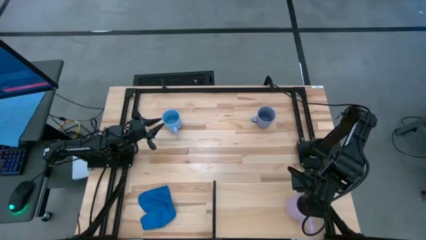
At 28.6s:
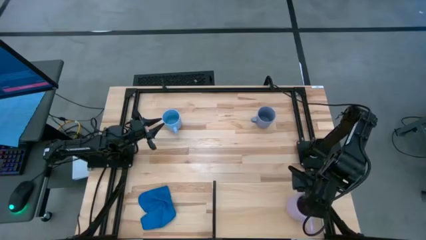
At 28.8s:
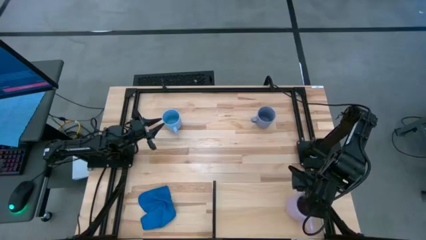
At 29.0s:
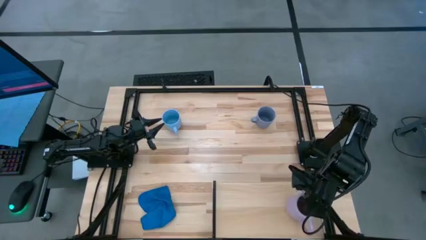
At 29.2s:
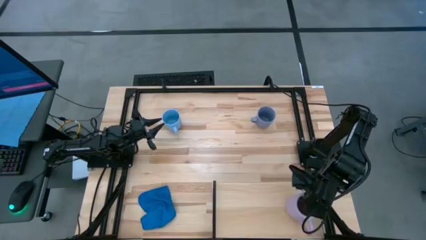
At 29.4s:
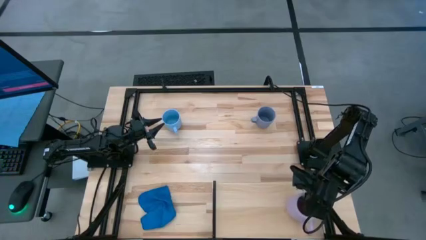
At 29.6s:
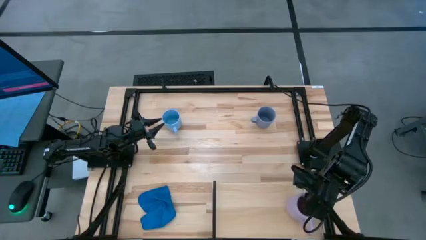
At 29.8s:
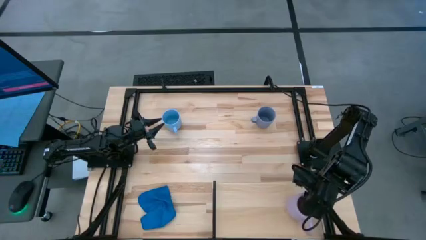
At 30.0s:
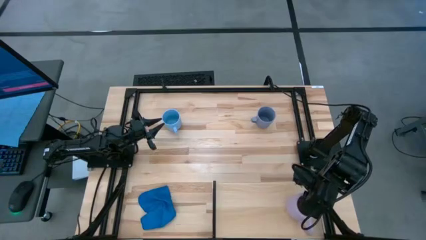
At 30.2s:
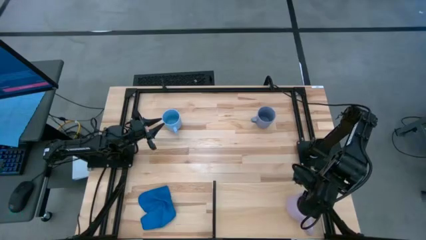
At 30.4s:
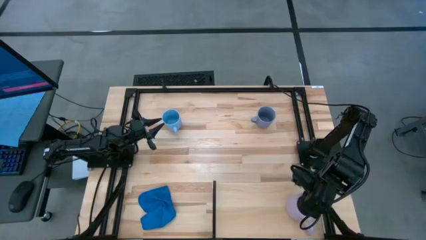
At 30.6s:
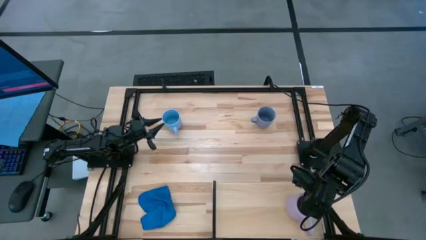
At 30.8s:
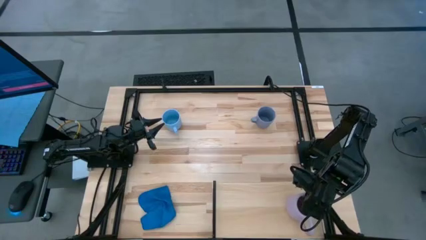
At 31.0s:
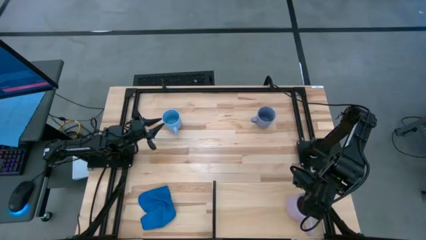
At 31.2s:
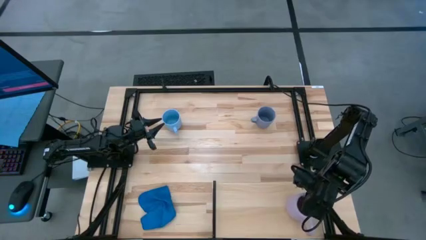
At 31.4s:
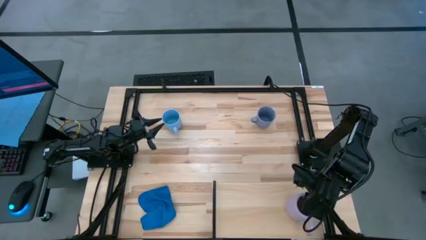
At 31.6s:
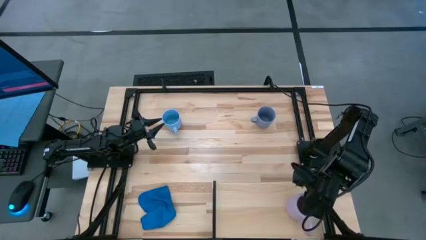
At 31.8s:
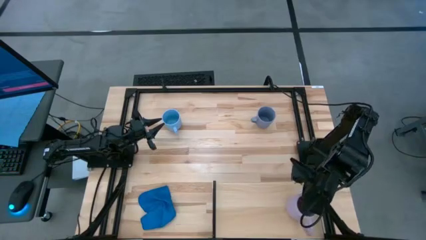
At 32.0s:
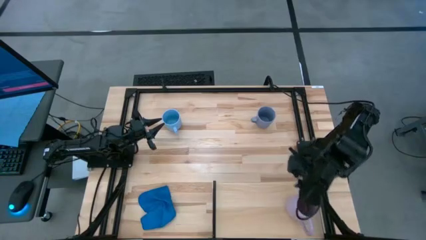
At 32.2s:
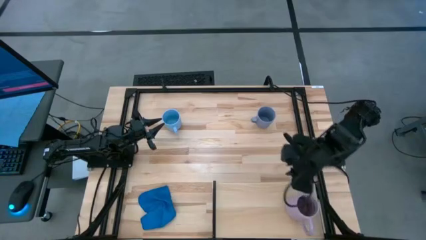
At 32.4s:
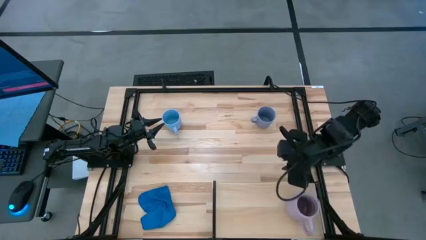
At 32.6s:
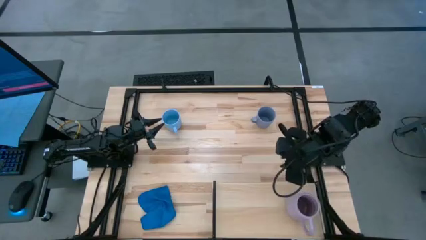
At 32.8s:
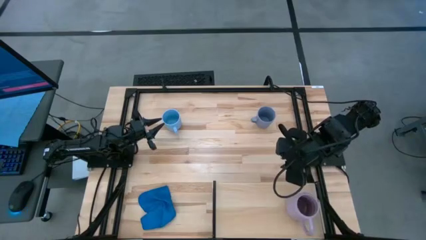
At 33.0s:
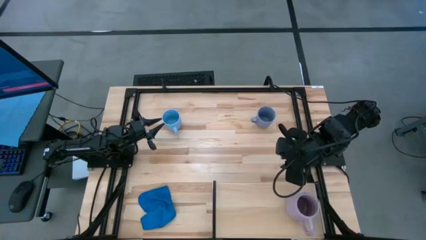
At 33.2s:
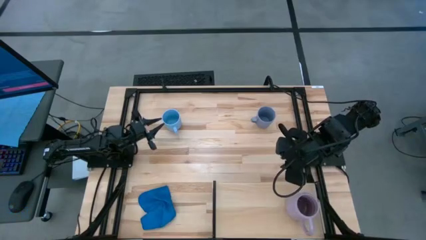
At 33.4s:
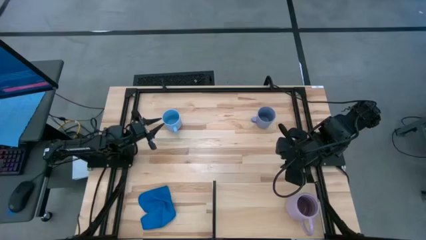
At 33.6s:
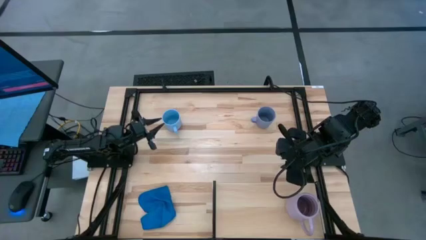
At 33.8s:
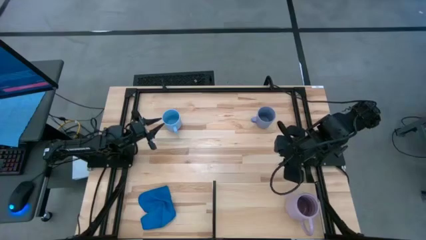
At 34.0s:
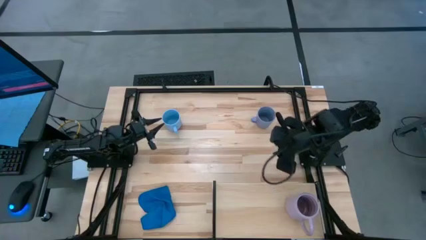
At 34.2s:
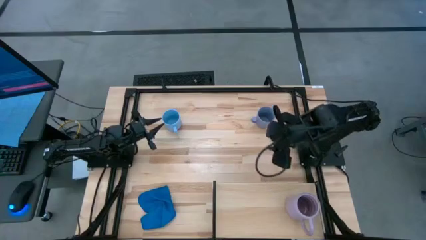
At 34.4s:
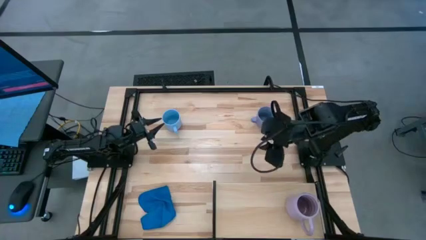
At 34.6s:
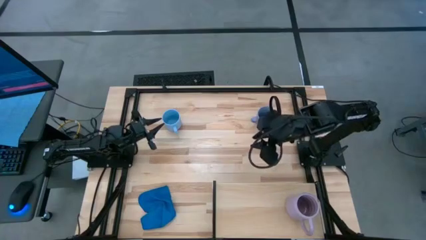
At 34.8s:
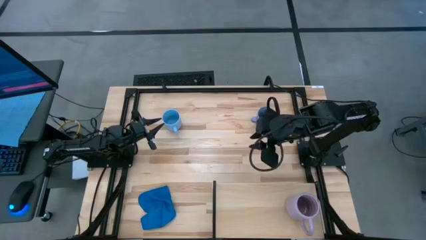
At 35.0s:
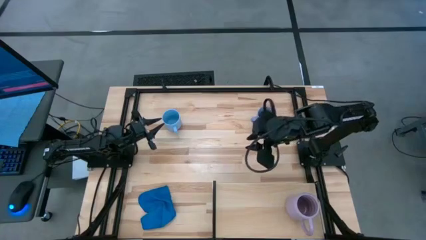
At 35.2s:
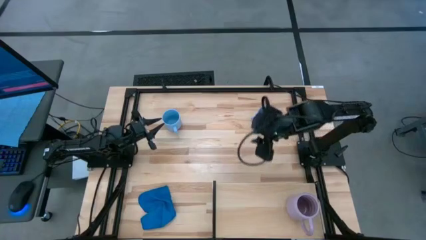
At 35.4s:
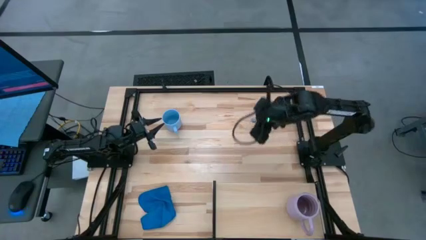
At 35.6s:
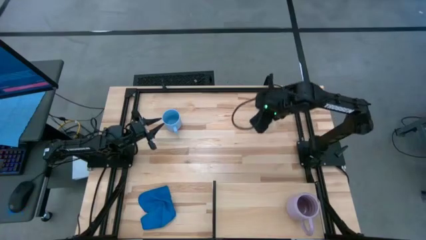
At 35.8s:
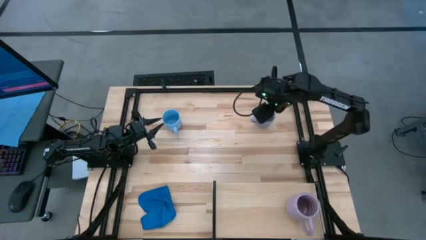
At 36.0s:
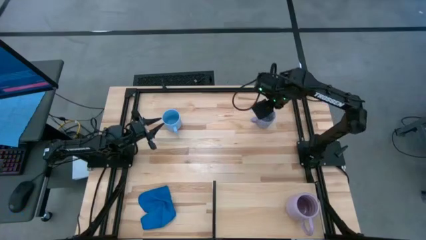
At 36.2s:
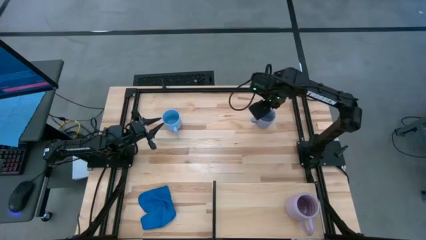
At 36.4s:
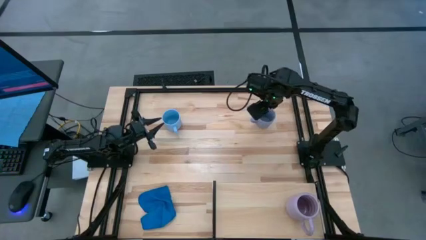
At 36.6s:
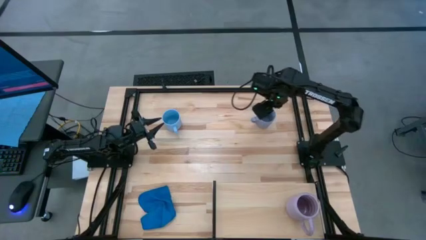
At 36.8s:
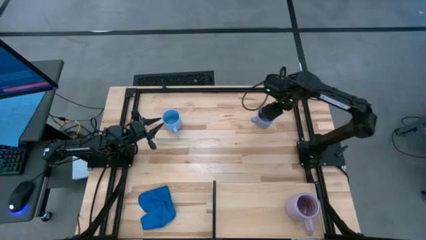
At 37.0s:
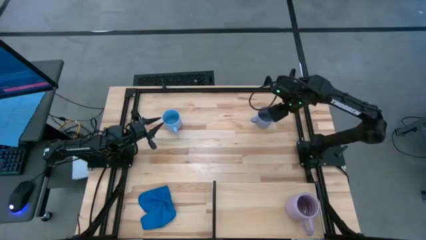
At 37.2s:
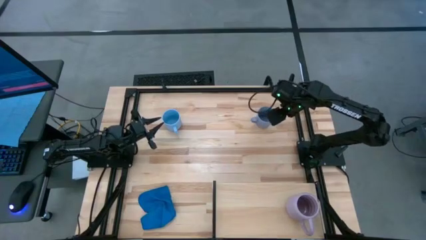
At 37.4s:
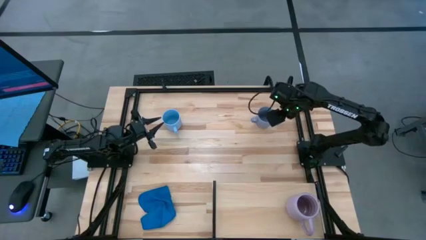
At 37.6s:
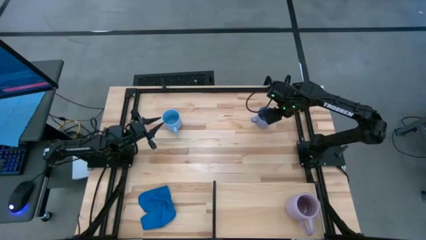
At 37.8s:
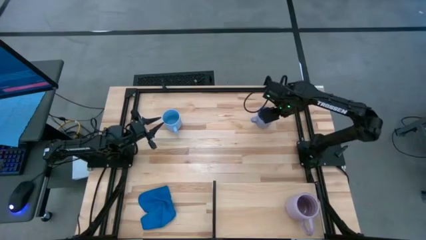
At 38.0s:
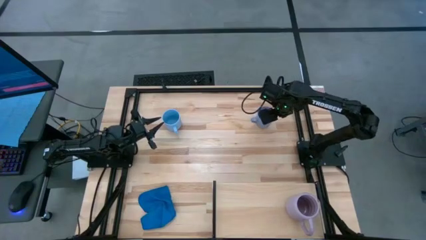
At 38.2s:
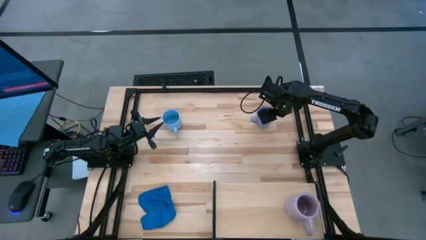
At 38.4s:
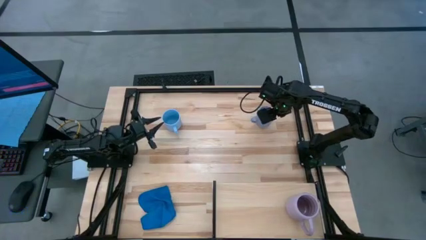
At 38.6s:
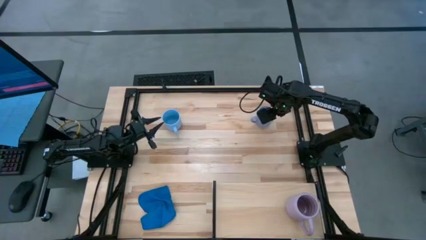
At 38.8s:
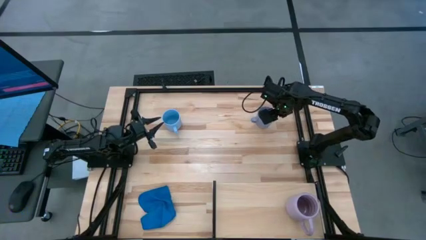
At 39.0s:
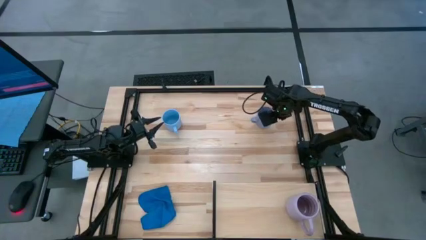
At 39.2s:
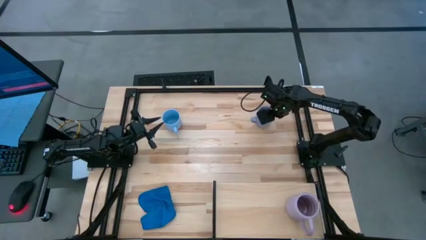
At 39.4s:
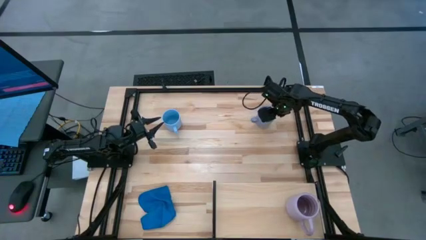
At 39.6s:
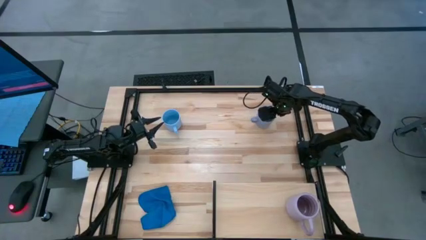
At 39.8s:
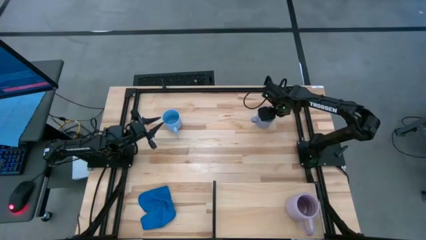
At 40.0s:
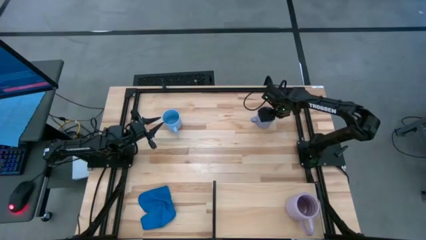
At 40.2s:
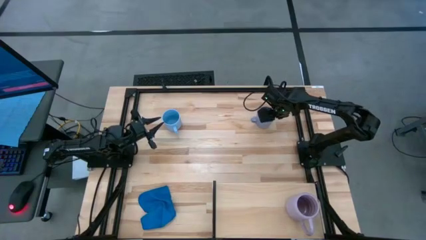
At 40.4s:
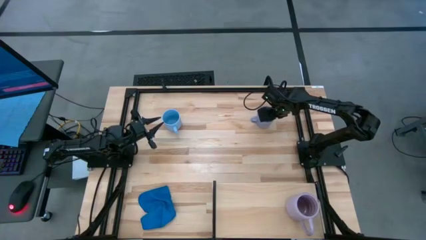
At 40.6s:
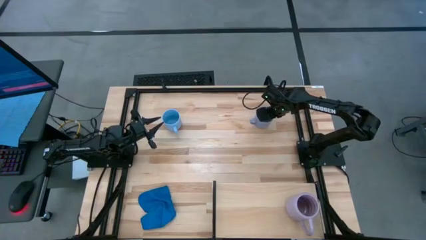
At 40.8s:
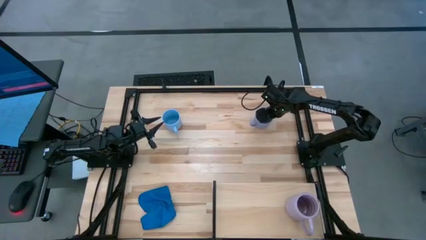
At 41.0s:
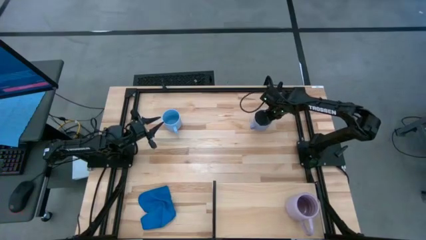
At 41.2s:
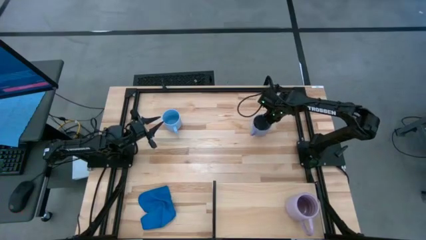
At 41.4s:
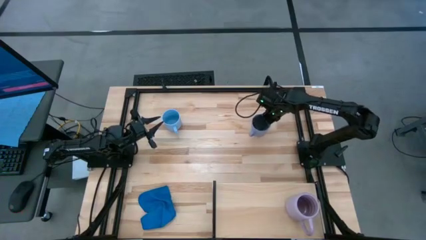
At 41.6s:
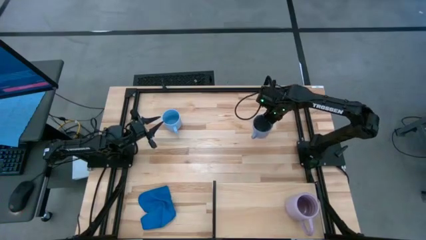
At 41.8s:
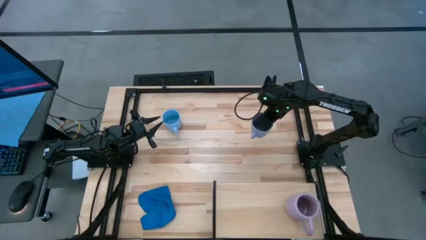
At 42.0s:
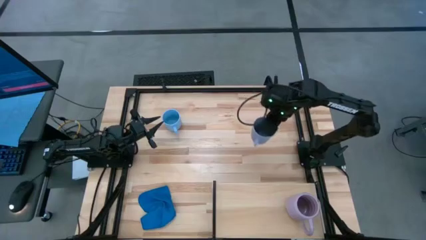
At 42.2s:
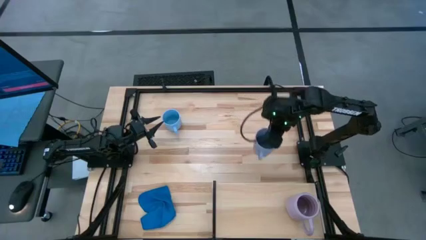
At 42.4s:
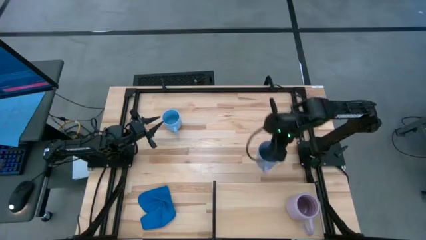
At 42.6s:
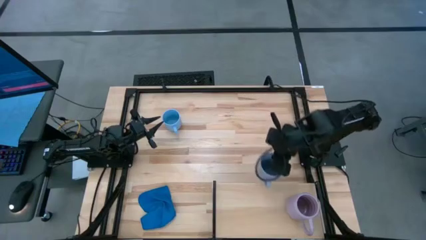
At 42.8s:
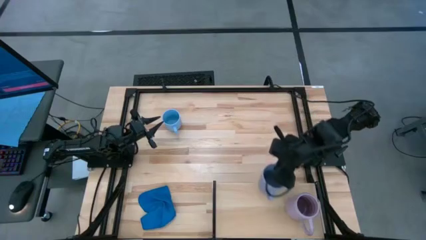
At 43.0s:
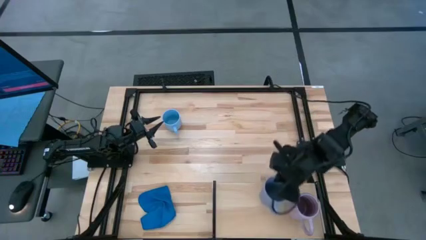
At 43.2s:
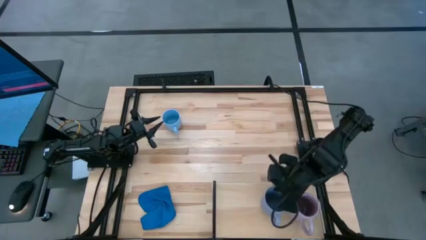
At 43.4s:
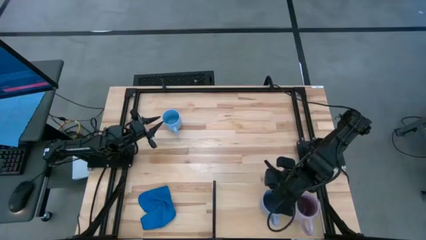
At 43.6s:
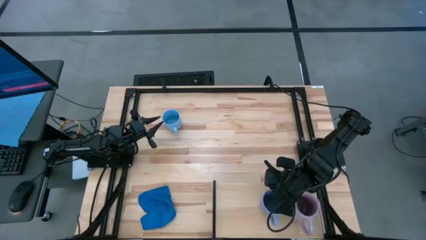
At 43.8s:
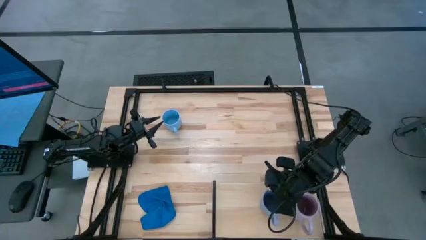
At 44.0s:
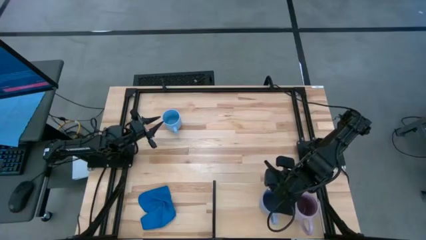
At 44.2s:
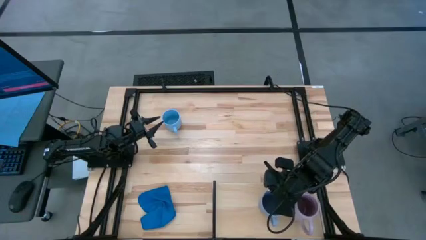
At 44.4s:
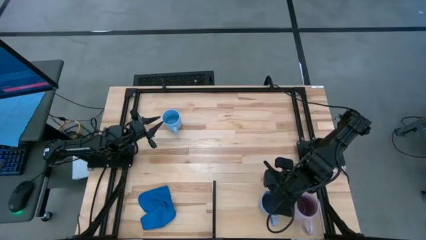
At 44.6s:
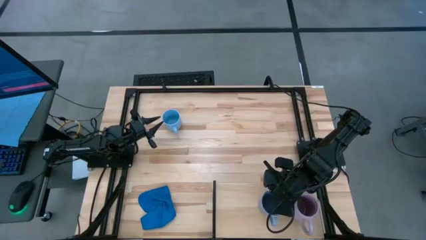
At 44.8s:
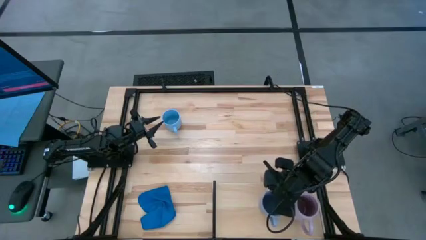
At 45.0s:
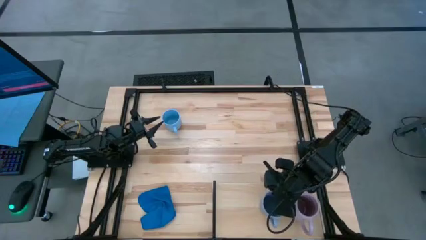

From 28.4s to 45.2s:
Task: Stack small to large cups/mugs on shelf
Put the blue mug on the shelf
